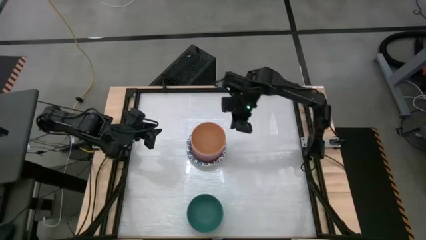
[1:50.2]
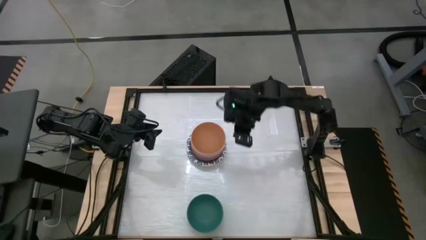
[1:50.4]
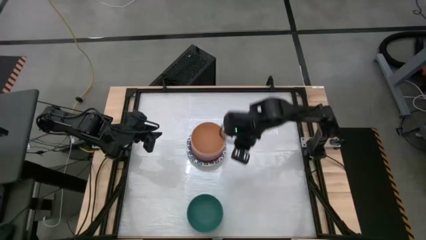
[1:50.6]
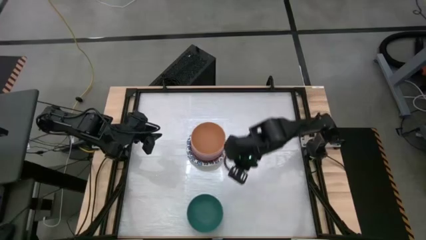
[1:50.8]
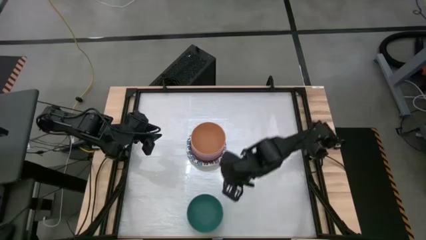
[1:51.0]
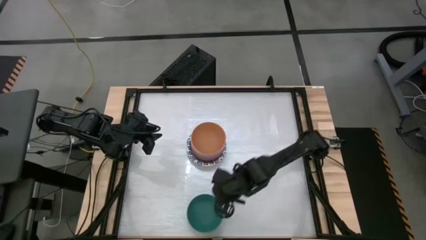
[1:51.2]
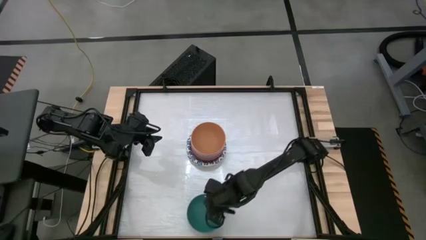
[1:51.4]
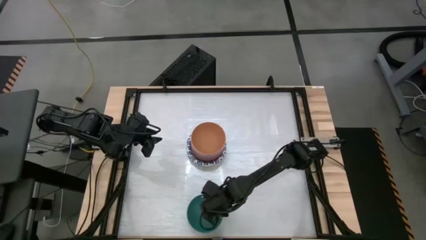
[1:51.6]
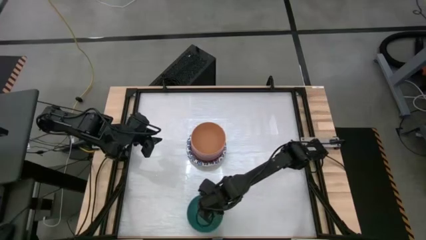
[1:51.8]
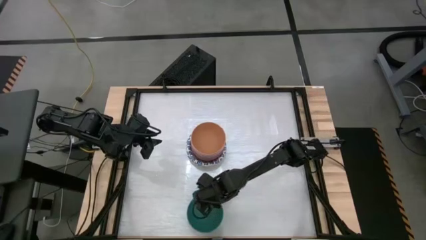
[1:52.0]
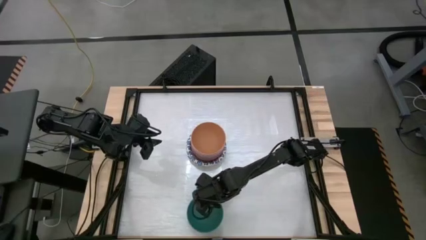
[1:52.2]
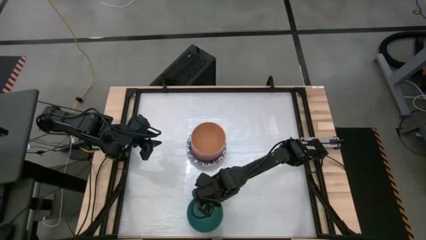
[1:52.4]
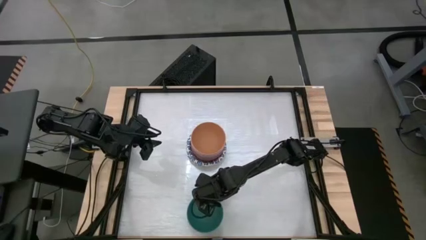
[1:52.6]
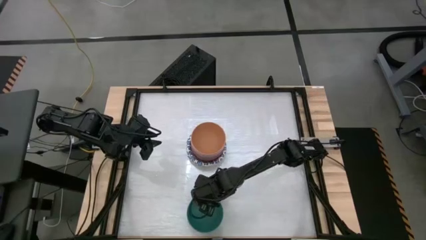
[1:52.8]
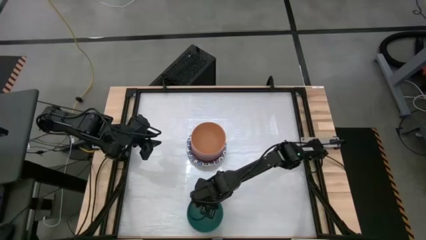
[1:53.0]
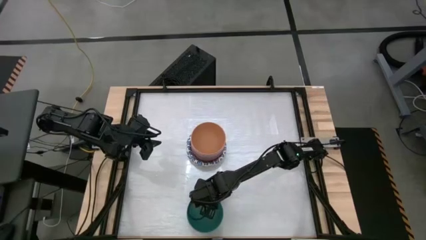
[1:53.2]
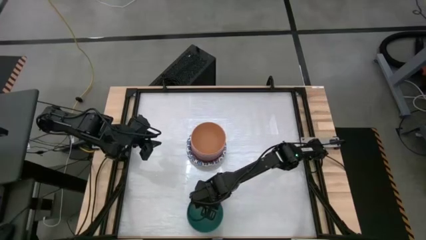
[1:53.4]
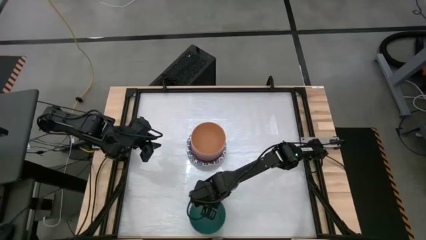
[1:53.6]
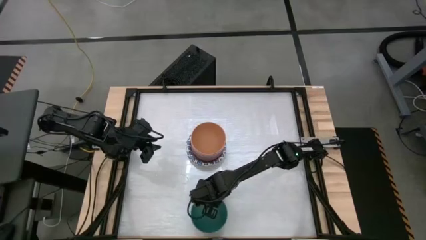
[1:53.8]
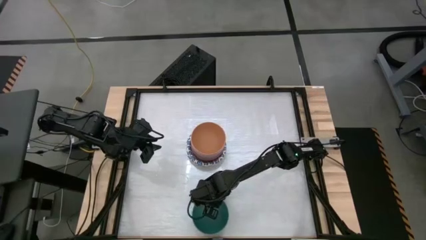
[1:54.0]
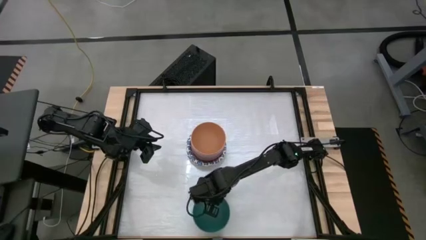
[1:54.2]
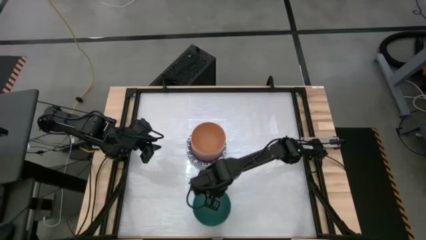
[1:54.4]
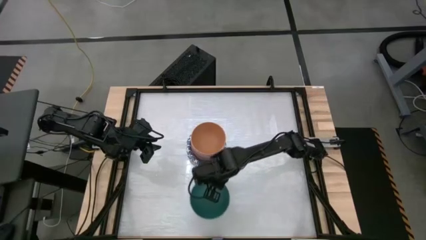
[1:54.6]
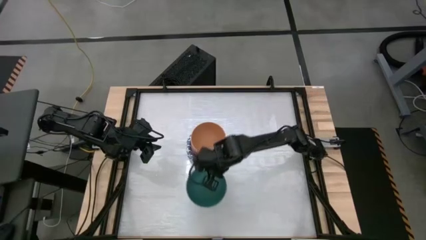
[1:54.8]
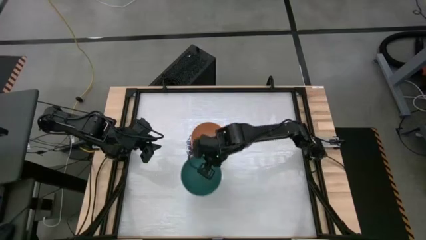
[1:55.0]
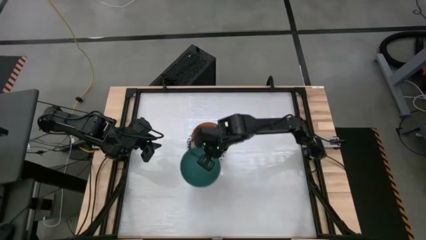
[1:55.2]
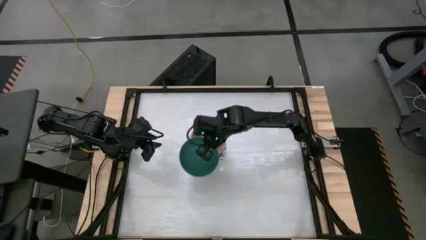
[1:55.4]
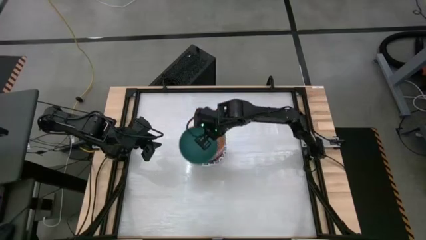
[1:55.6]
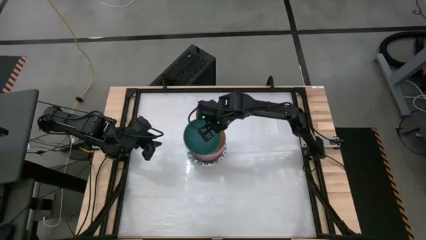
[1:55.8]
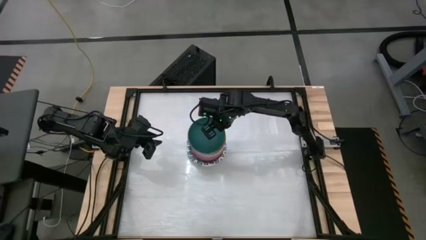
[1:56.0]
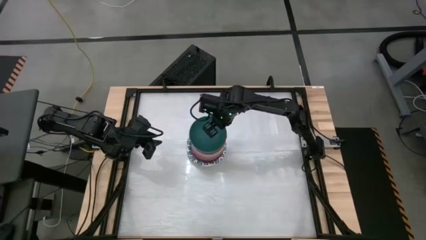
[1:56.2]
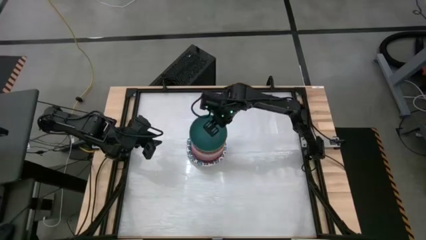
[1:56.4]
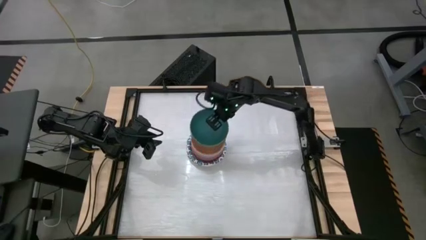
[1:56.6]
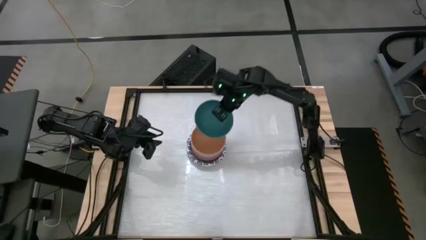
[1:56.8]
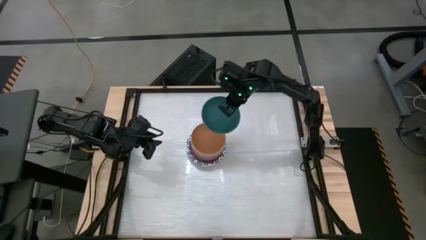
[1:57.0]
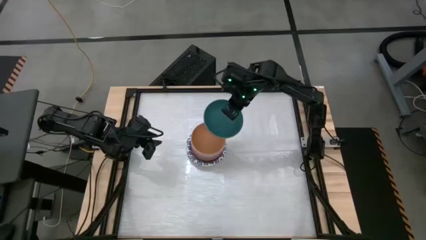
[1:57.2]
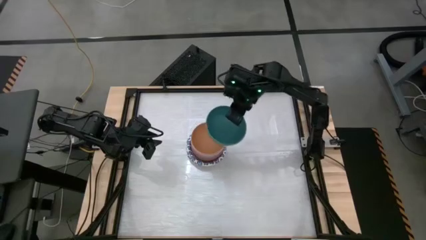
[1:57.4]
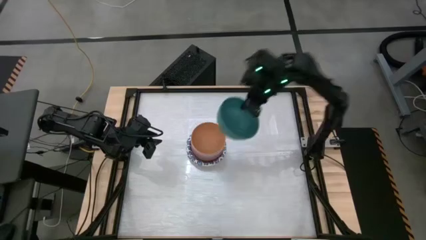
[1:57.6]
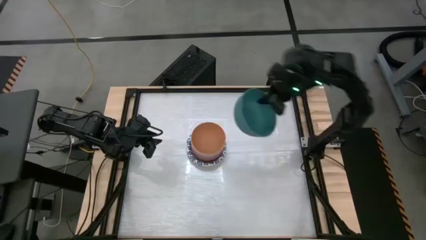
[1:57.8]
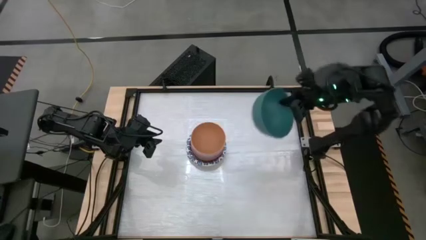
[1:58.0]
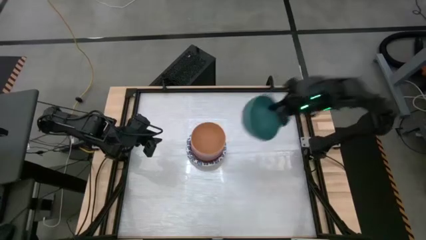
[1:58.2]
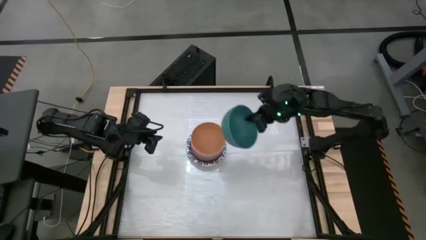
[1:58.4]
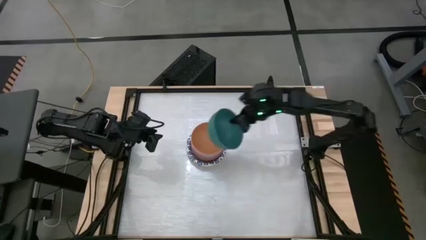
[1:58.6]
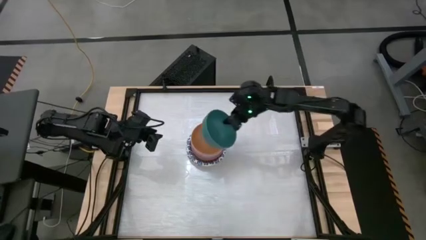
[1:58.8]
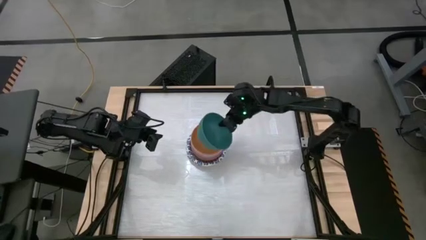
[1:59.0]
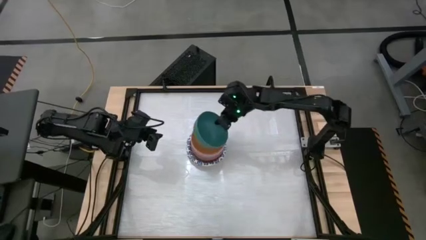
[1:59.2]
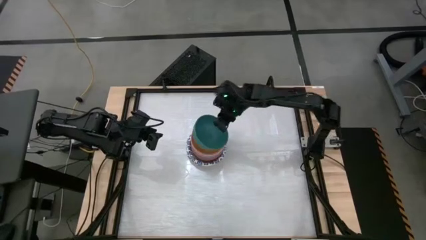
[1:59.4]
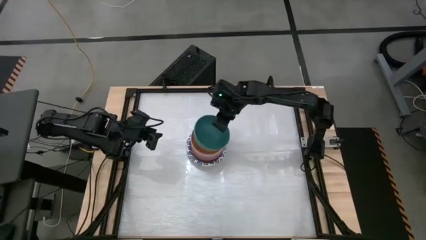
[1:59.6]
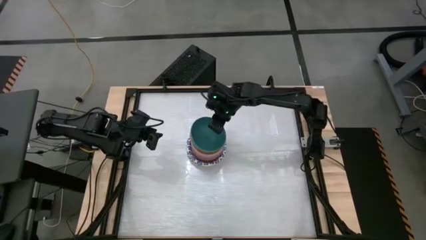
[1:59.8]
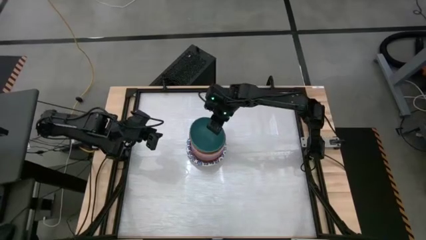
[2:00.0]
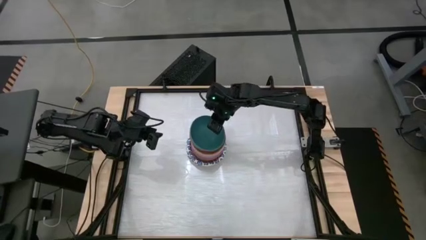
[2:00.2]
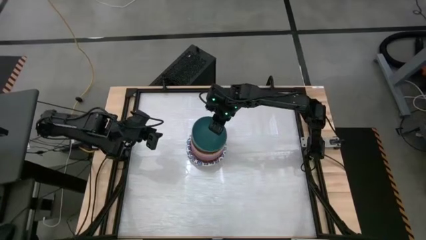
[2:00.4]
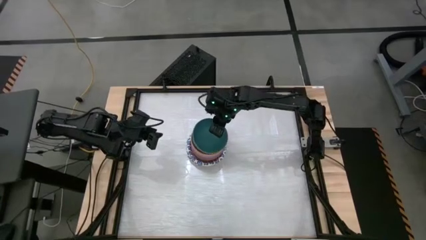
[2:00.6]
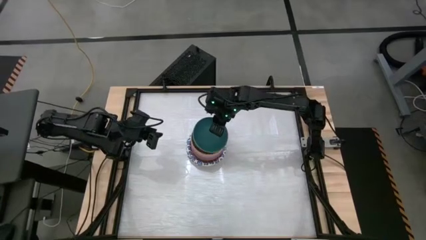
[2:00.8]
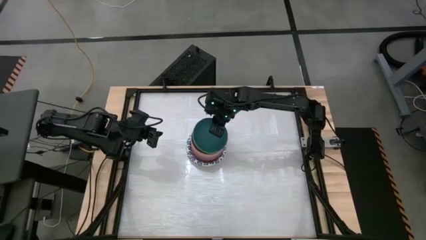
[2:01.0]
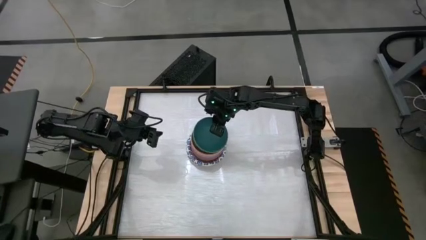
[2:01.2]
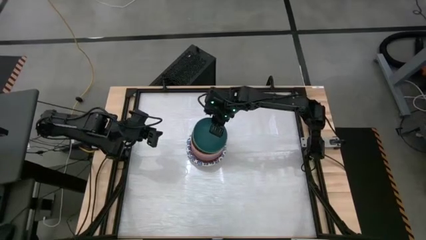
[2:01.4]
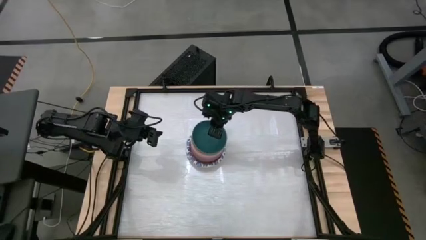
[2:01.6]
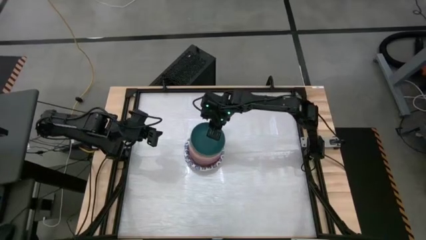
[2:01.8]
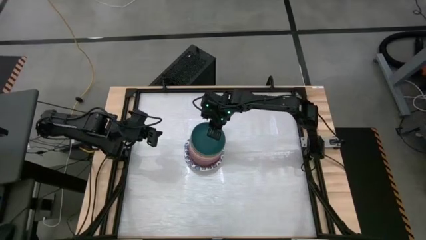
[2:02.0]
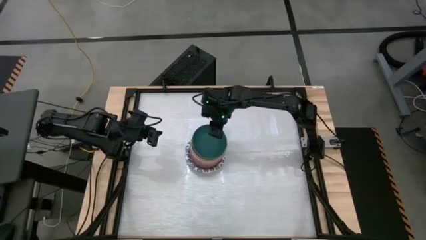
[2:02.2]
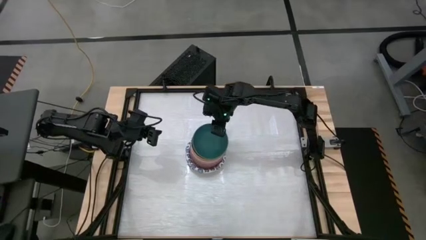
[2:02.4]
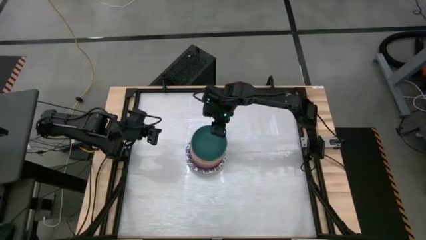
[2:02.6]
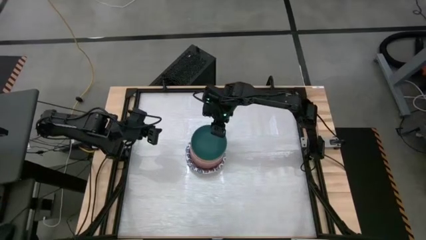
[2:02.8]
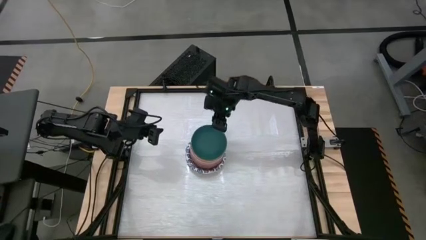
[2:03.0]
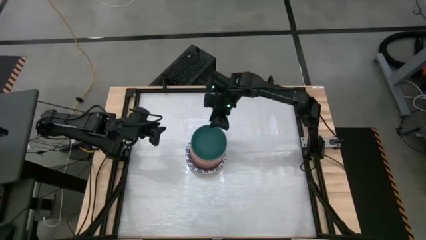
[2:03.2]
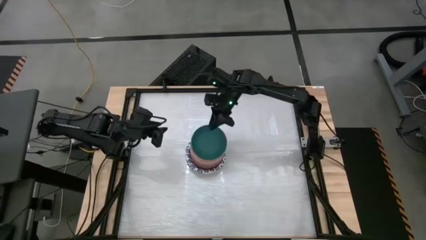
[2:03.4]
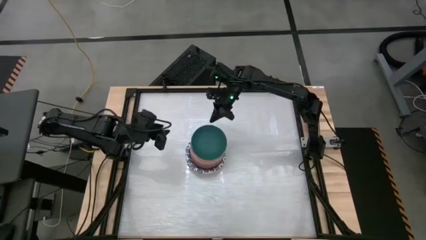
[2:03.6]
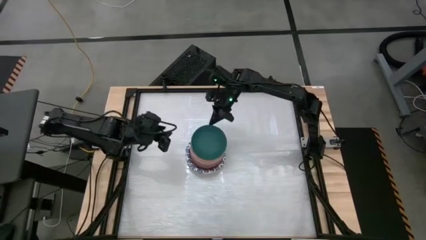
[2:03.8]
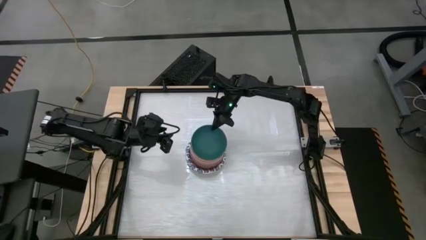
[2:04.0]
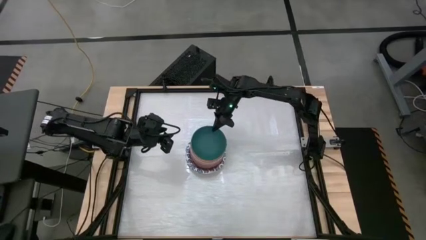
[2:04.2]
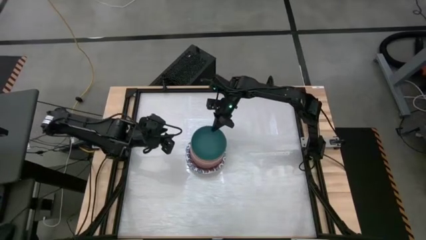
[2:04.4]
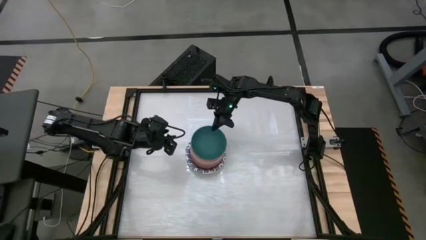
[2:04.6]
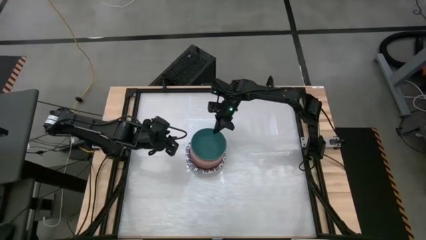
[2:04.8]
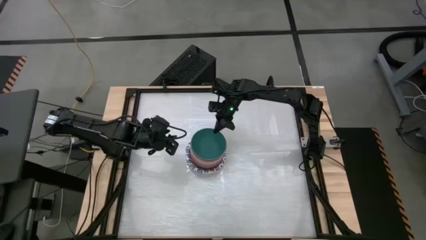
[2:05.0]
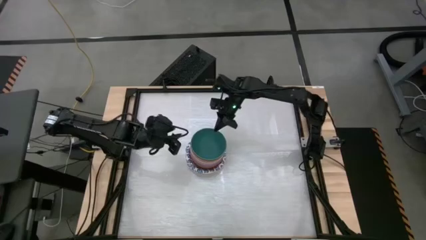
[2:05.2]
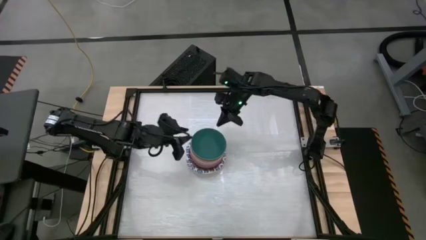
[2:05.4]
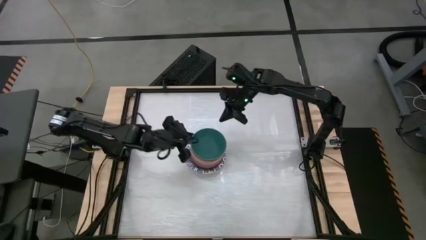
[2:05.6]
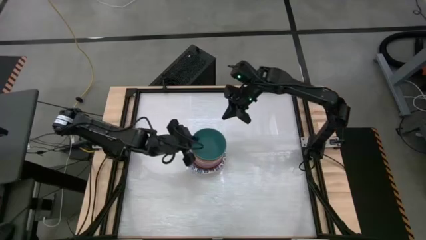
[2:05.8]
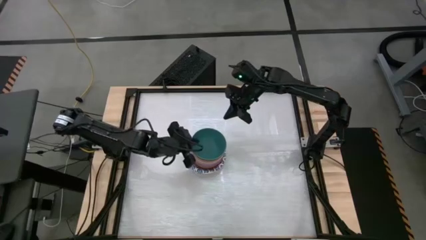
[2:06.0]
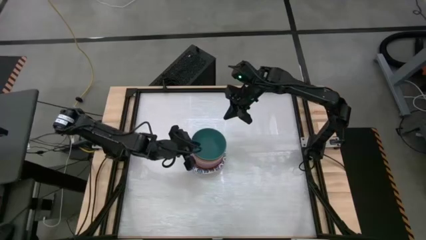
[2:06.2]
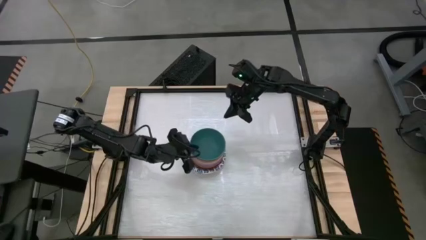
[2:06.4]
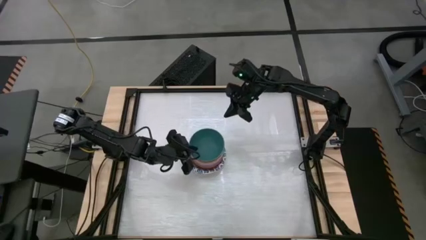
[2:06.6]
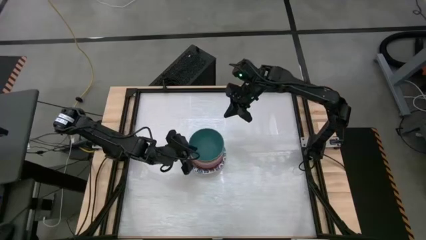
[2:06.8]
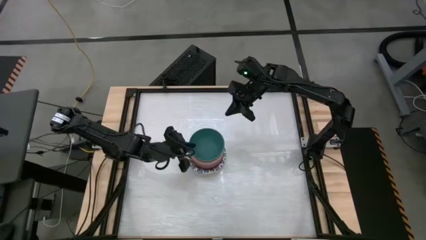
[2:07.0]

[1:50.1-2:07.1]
Stack the dark green bowl on top of the orange bowl
